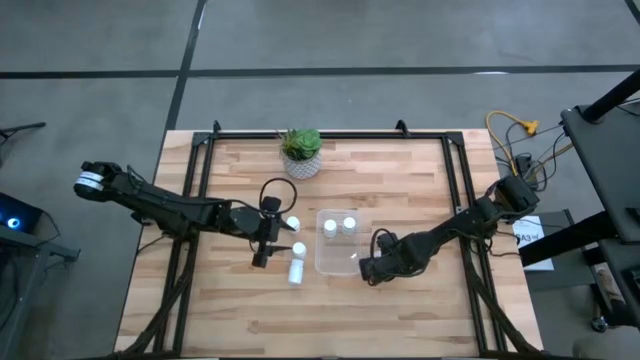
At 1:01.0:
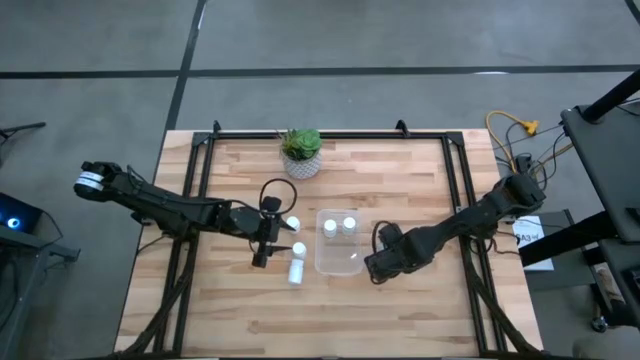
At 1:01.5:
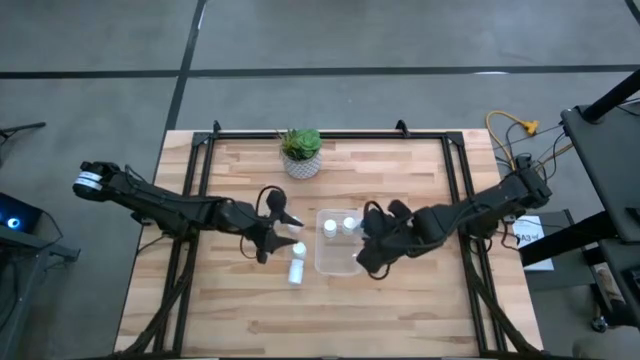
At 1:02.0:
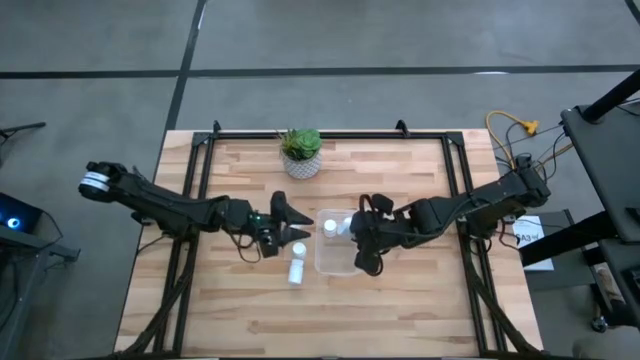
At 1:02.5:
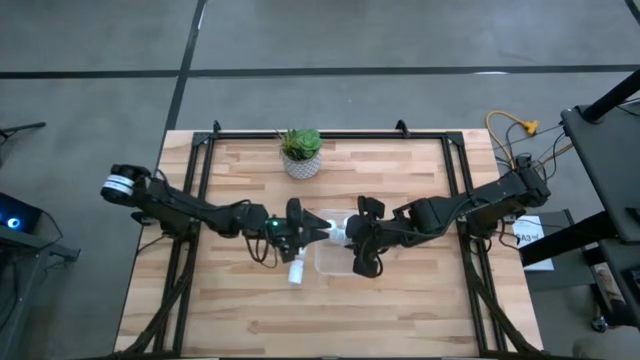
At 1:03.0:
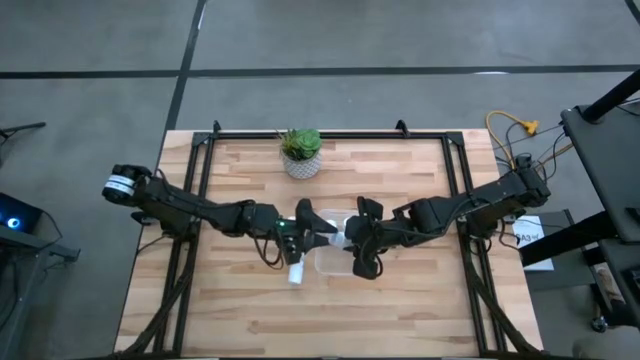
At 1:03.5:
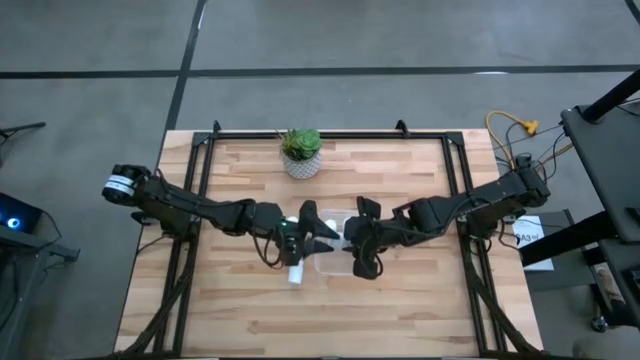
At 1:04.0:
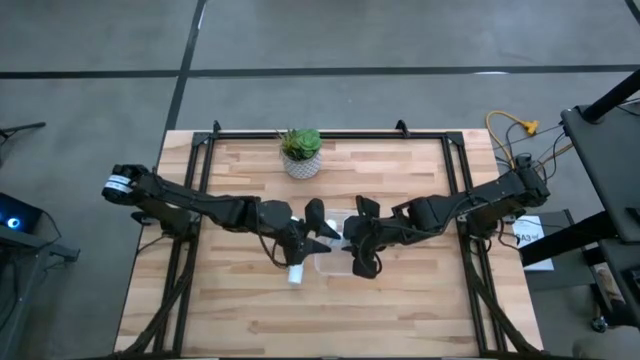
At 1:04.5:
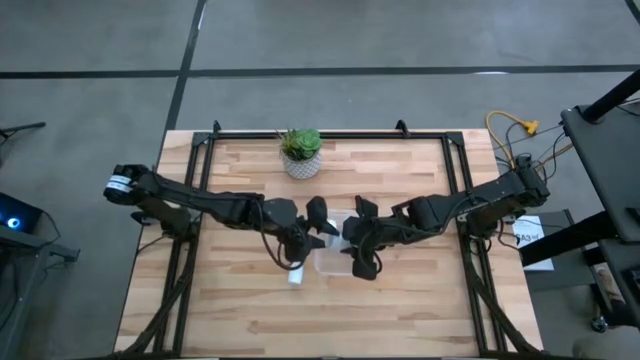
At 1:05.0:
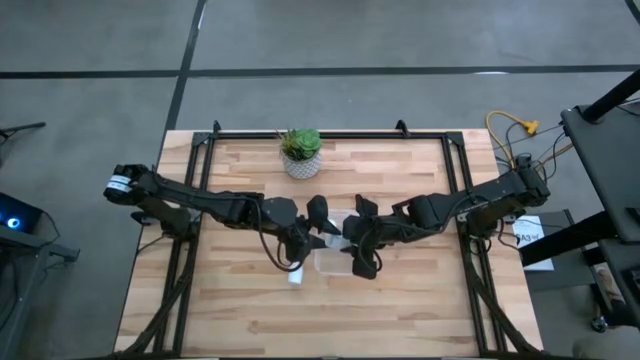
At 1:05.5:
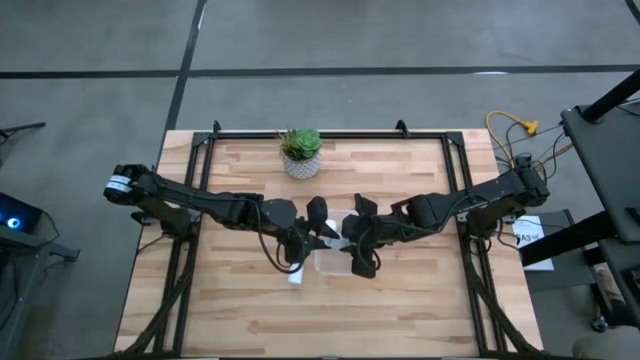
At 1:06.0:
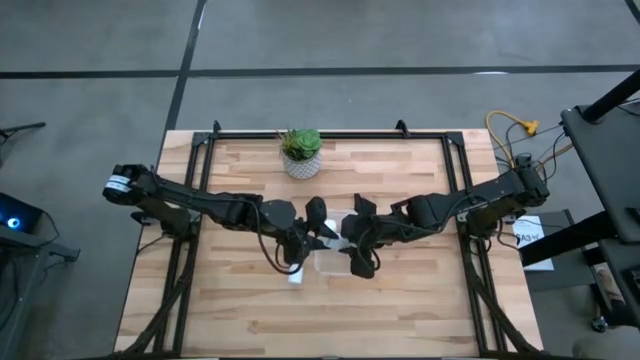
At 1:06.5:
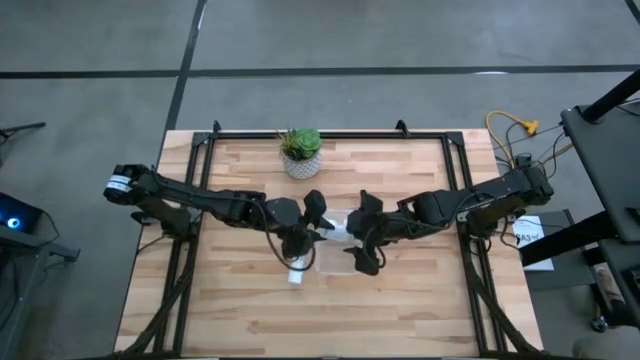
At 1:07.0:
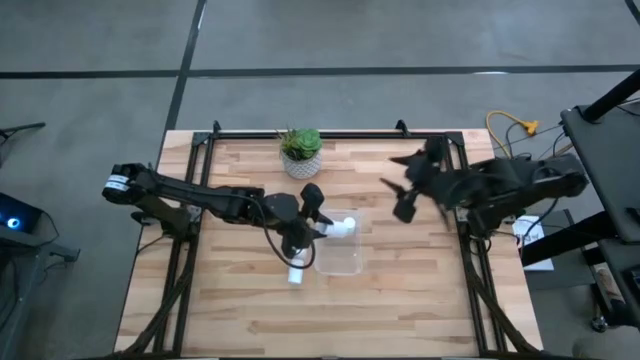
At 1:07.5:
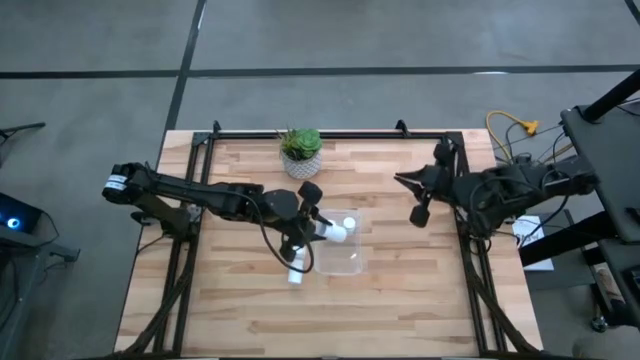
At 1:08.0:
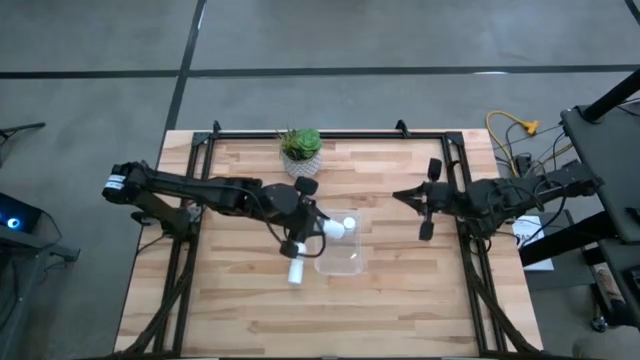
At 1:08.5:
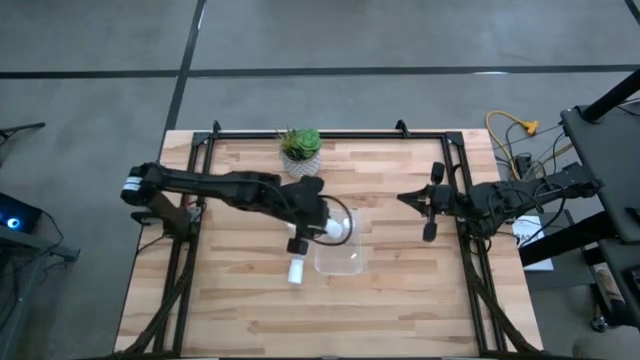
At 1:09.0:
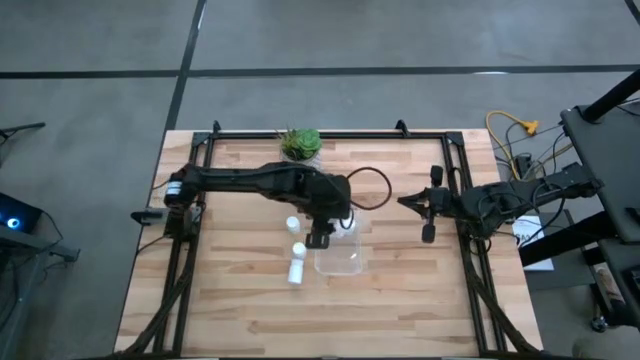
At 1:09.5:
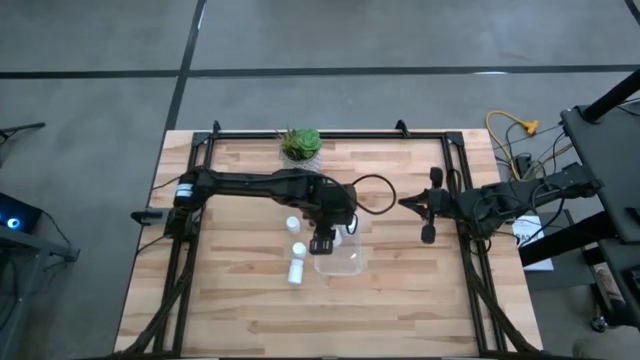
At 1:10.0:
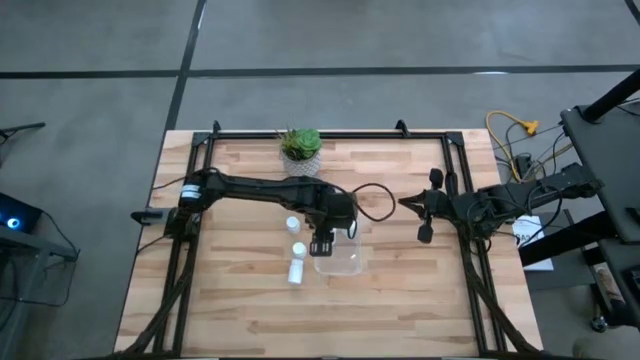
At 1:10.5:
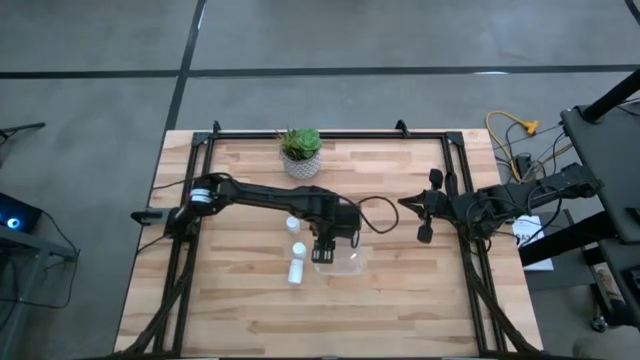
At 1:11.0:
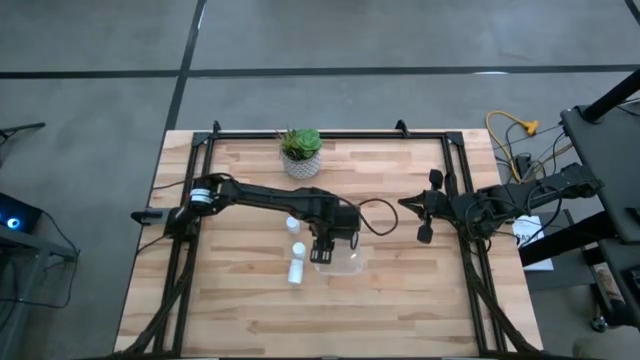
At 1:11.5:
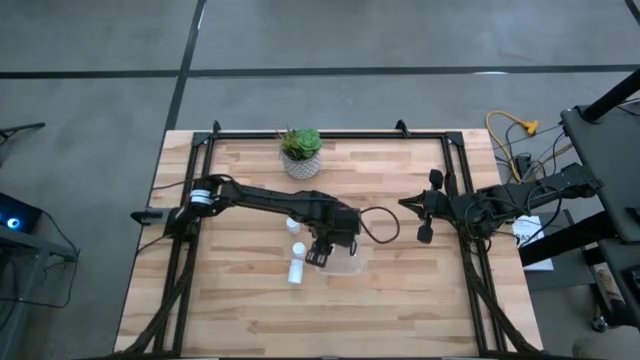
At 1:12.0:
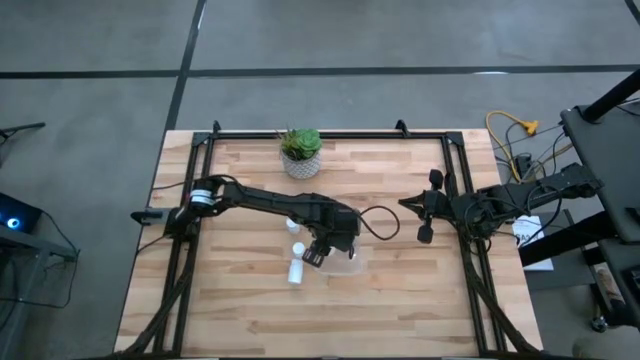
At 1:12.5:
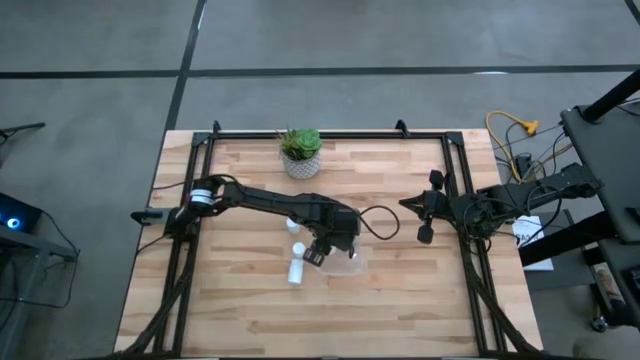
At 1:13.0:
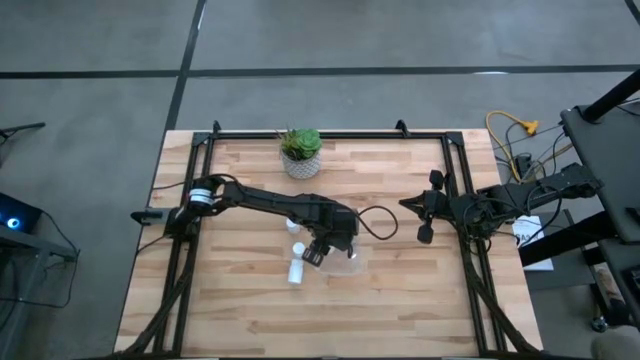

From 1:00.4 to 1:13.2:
Task: Pick and place pill bottles into a basket
Put the white medicine bottle into the transparent bin

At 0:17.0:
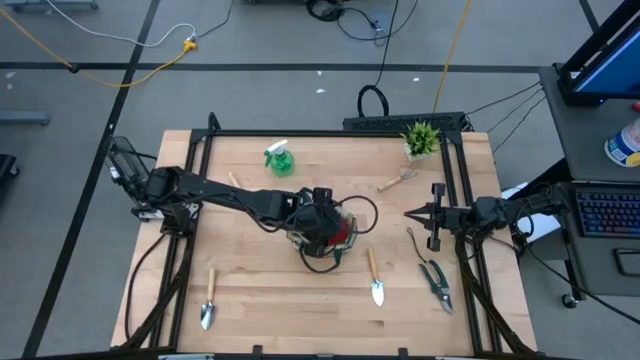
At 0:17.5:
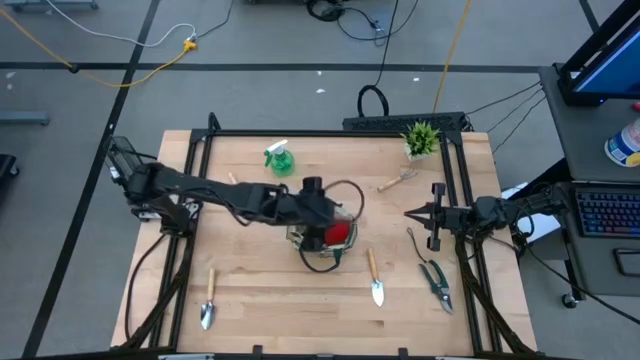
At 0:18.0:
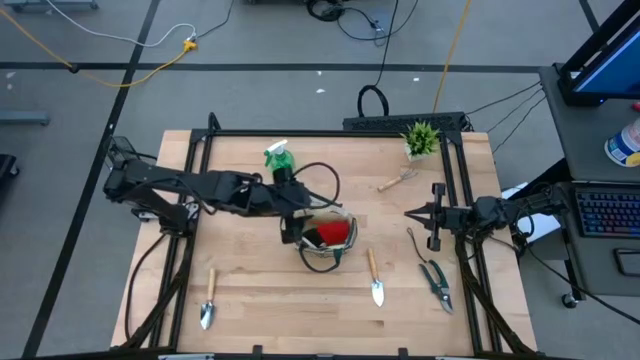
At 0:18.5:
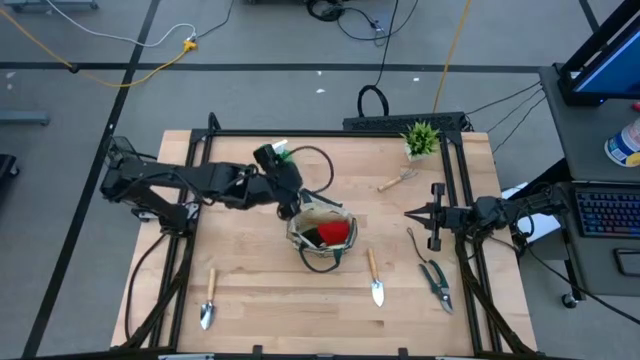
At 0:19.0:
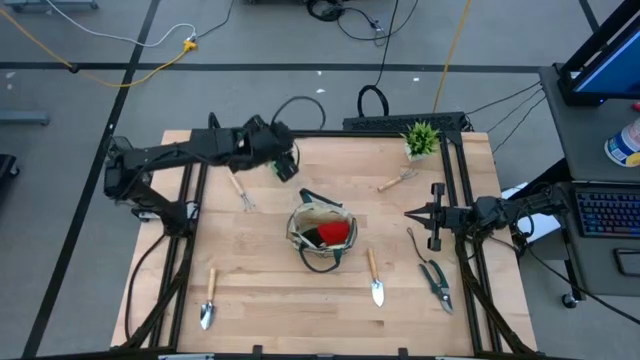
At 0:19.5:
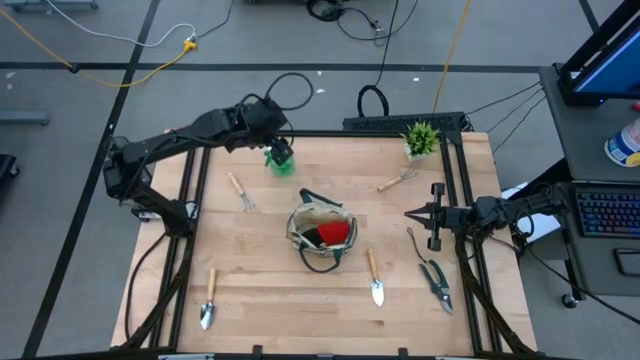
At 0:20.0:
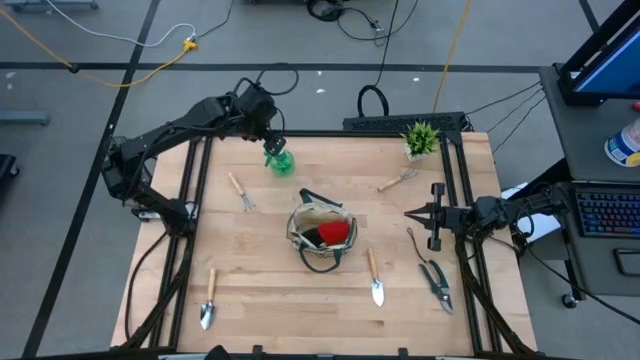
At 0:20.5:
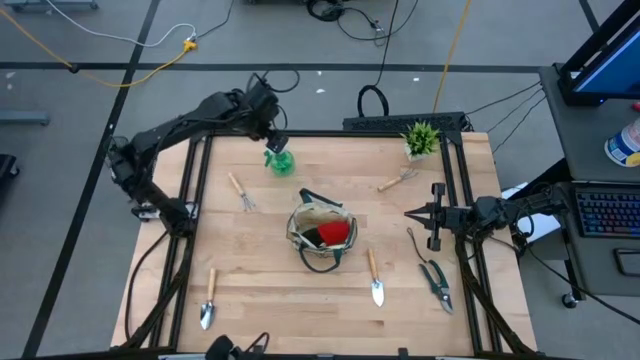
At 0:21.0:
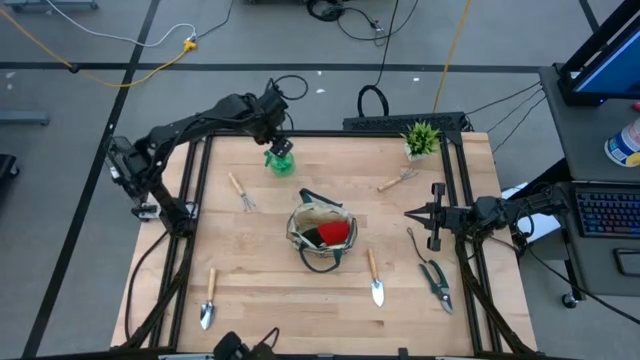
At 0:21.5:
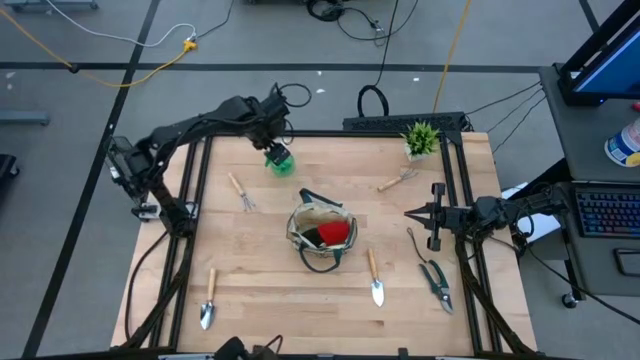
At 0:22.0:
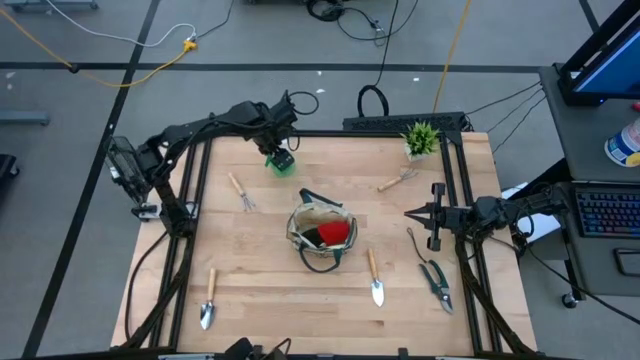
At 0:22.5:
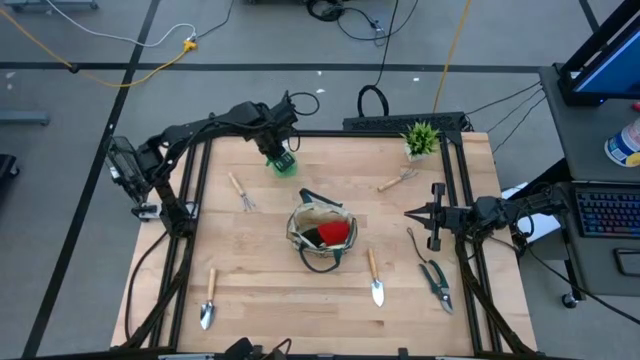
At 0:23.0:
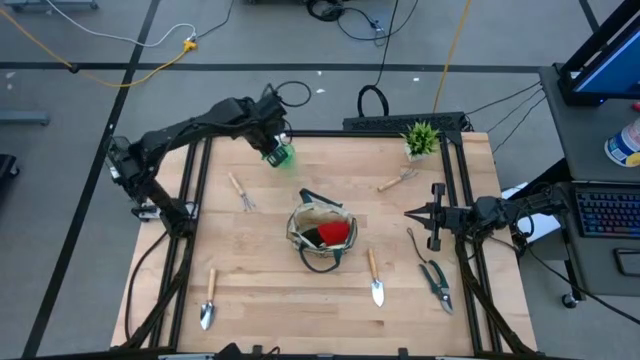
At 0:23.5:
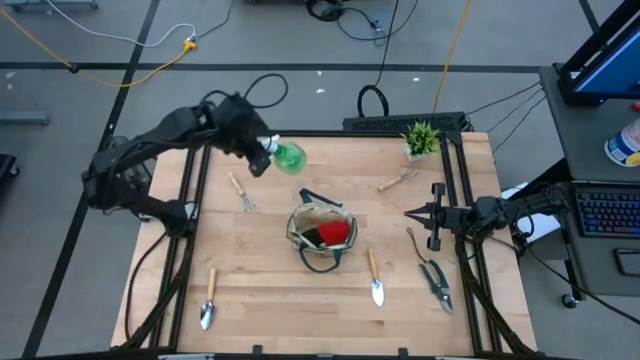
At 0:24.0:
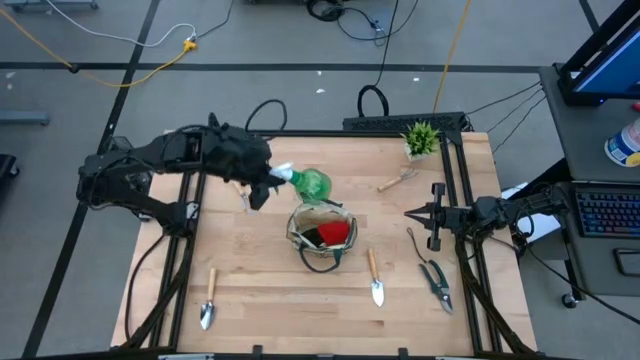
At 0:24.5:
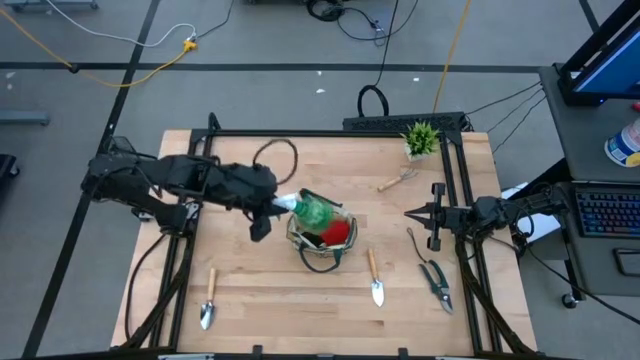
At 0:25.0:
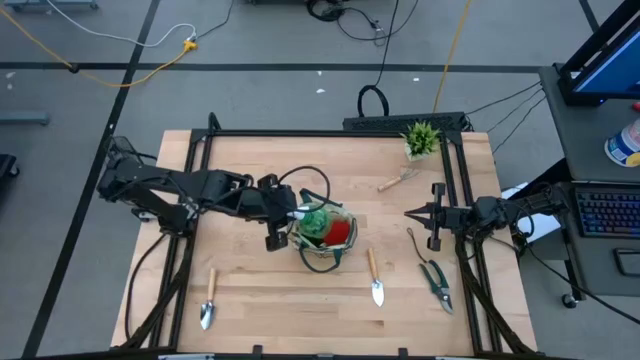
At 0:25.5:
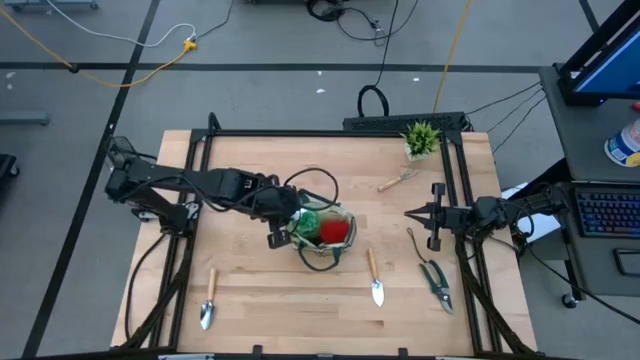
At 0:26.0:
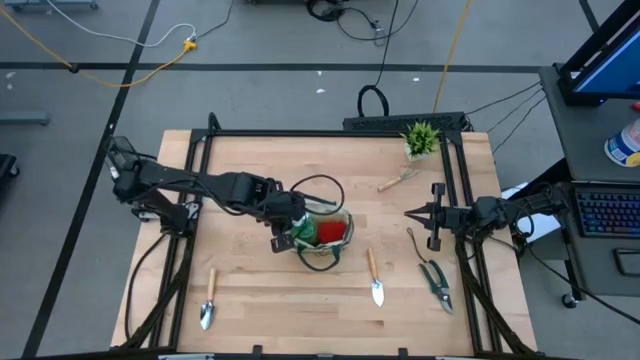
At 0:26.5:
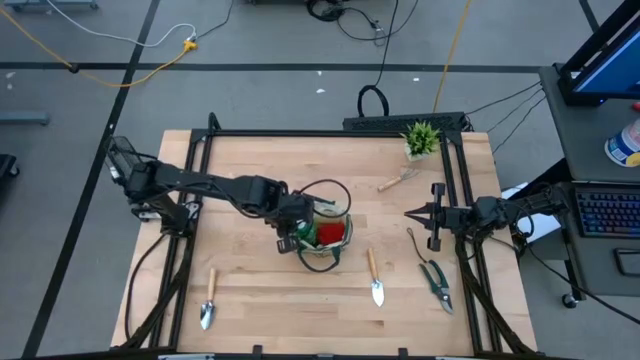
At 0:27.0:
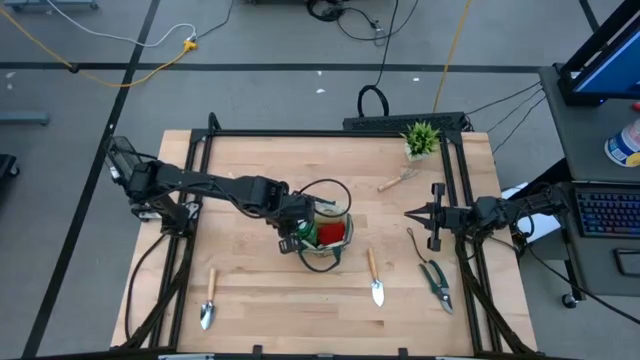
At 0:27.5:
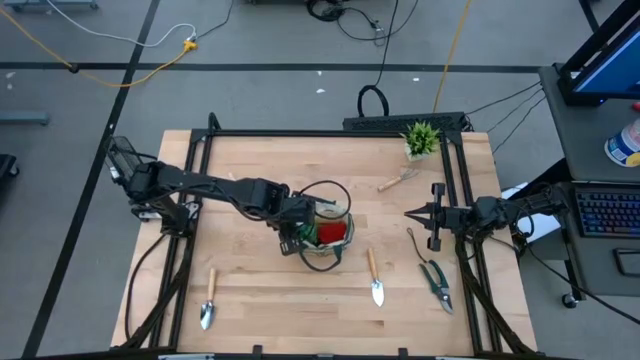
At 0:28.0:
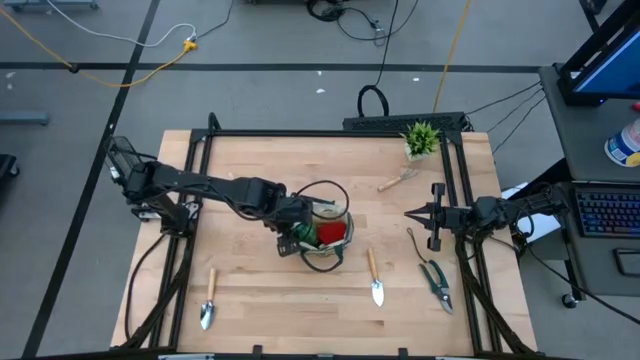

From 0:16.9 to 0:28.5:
Task: Pick & Place Garden tools in Gardening bag
Put the green spray bottle into the gardening bag
